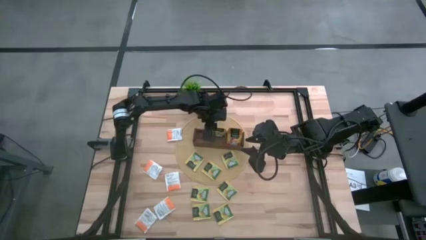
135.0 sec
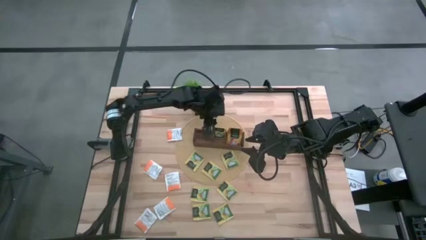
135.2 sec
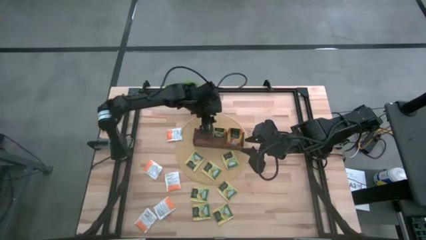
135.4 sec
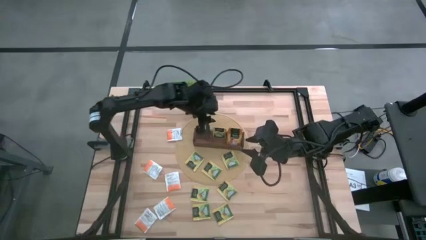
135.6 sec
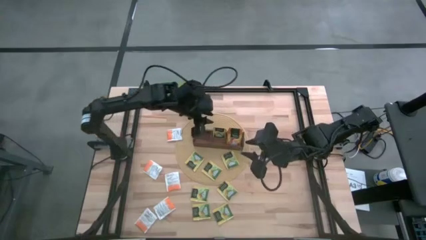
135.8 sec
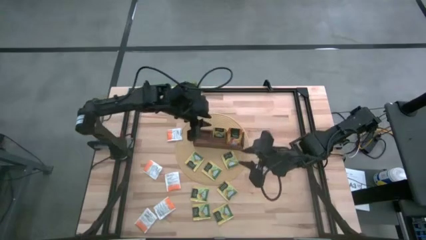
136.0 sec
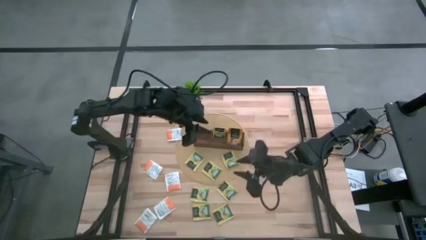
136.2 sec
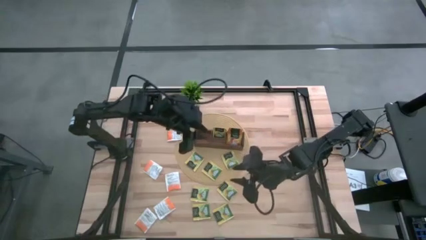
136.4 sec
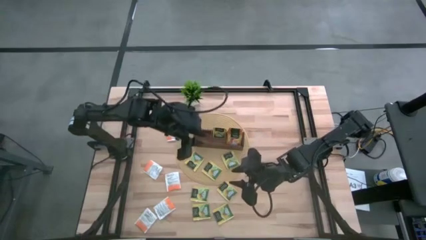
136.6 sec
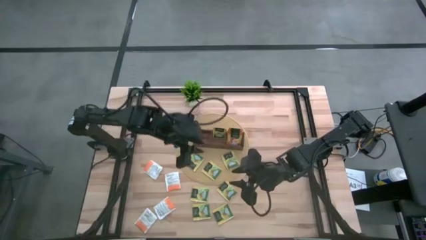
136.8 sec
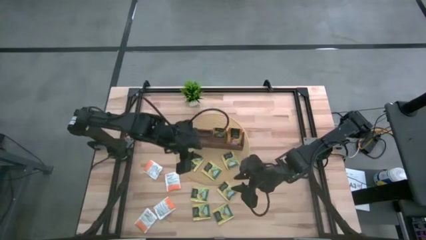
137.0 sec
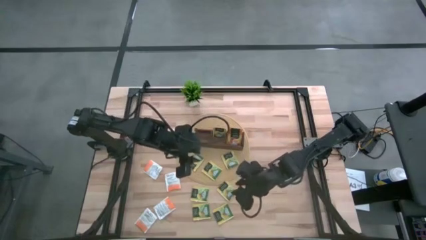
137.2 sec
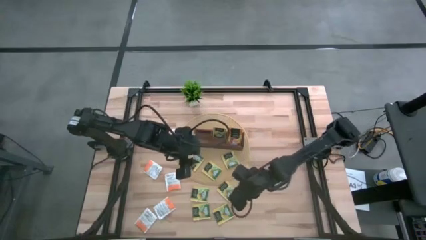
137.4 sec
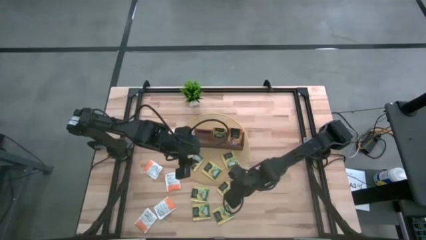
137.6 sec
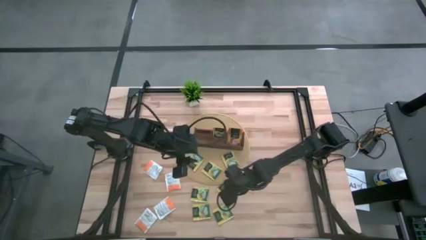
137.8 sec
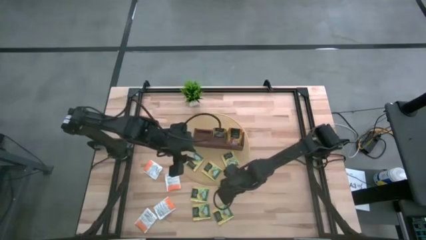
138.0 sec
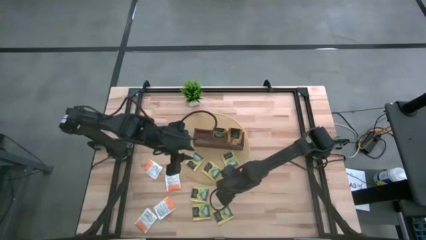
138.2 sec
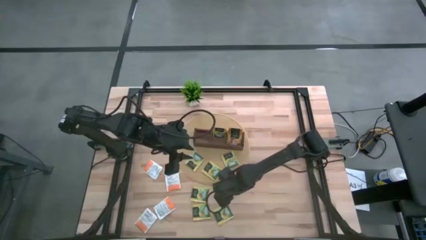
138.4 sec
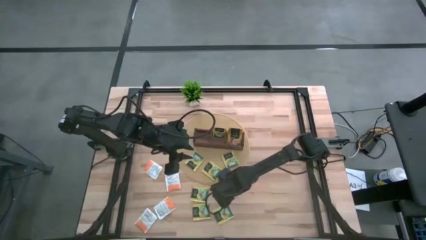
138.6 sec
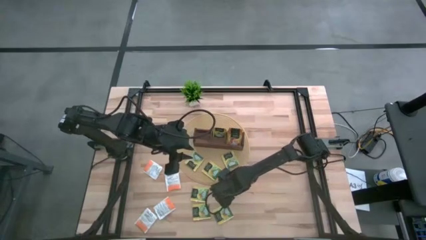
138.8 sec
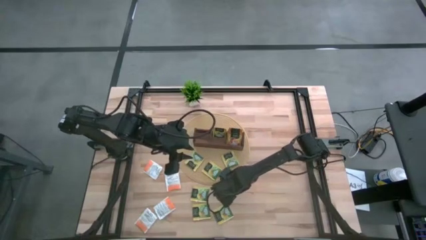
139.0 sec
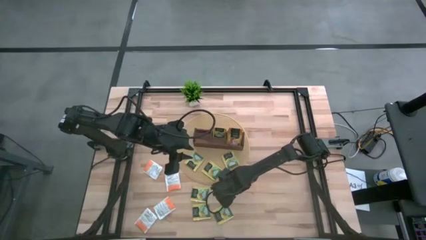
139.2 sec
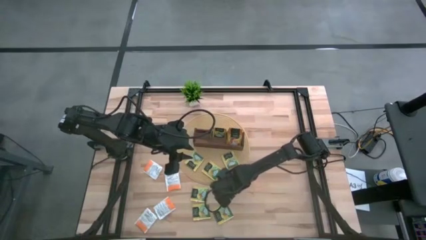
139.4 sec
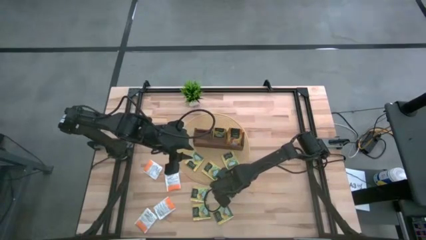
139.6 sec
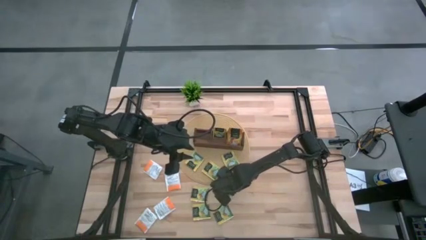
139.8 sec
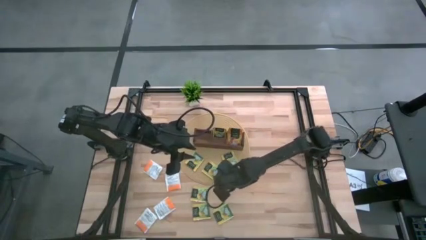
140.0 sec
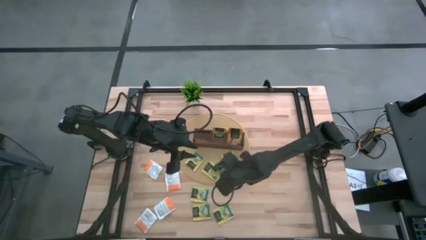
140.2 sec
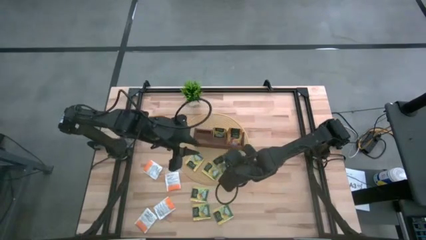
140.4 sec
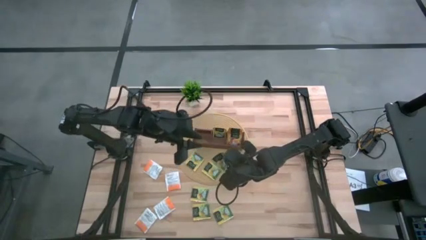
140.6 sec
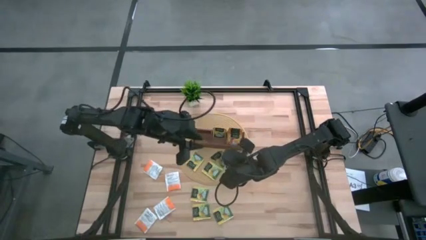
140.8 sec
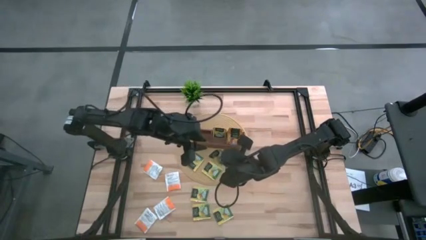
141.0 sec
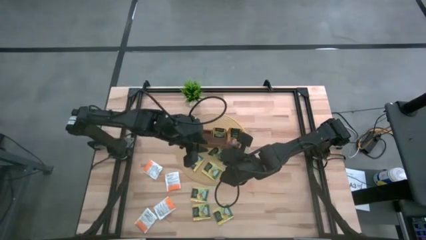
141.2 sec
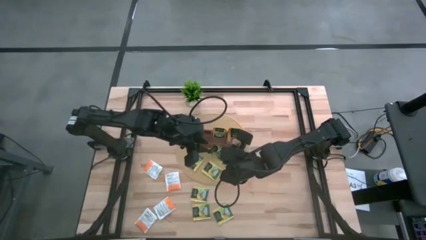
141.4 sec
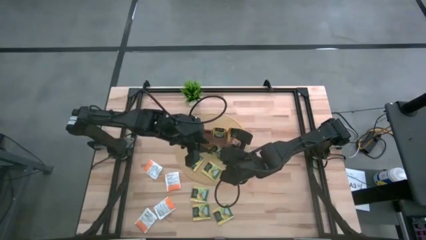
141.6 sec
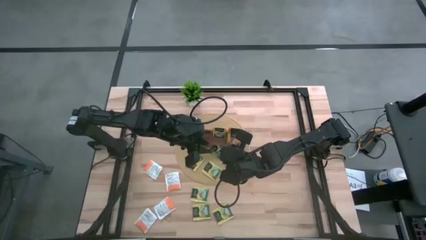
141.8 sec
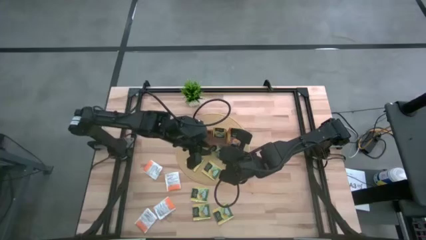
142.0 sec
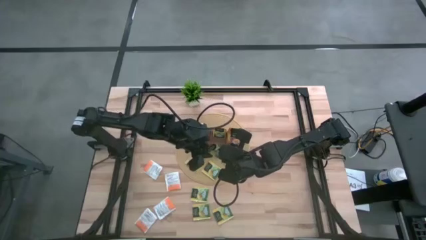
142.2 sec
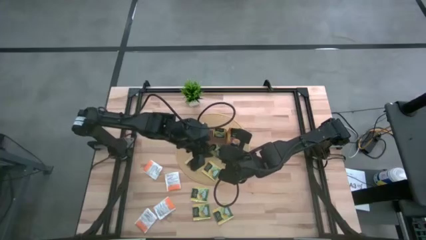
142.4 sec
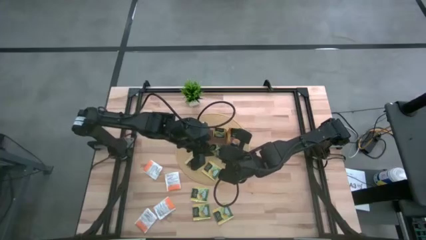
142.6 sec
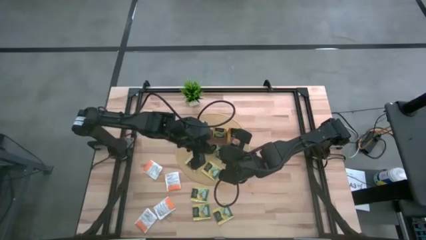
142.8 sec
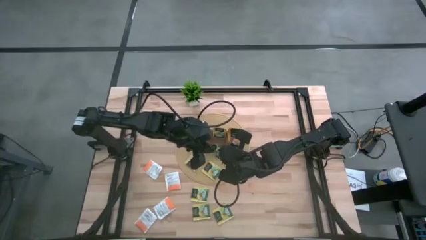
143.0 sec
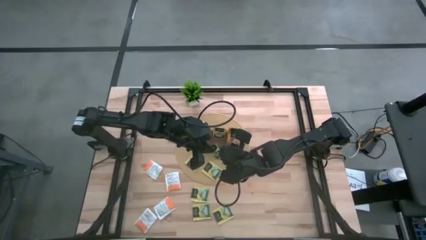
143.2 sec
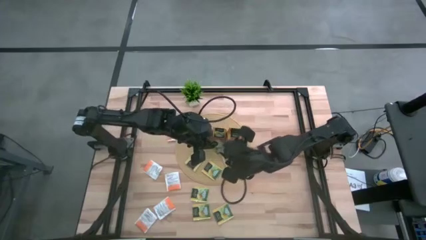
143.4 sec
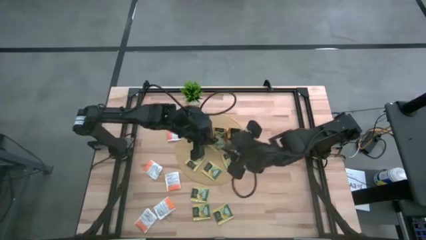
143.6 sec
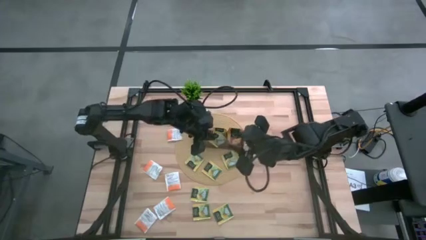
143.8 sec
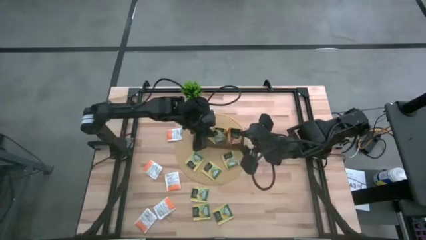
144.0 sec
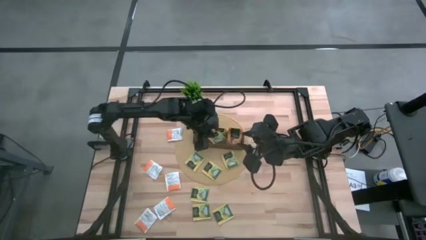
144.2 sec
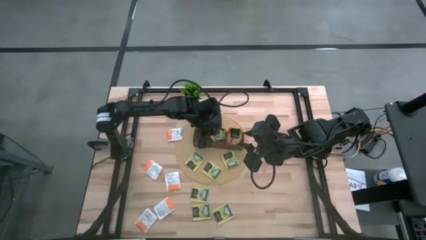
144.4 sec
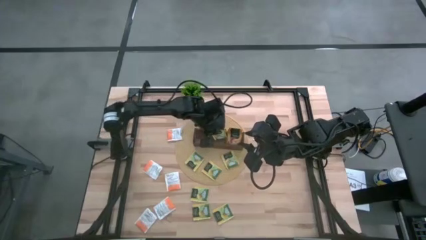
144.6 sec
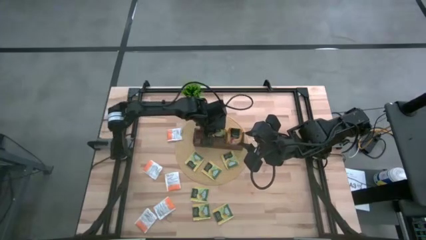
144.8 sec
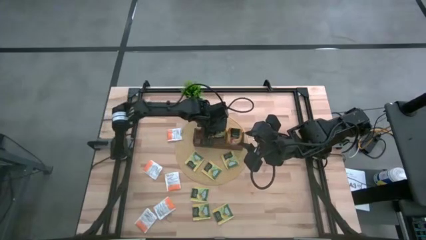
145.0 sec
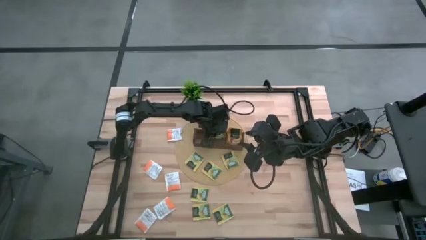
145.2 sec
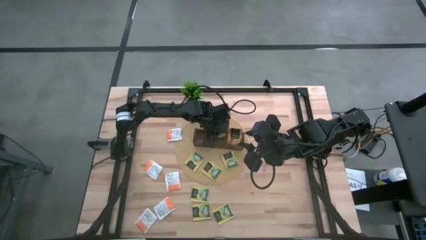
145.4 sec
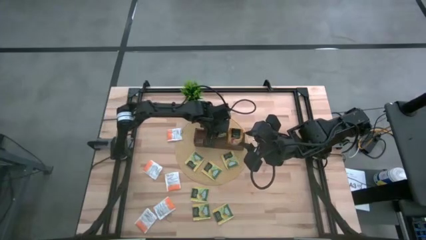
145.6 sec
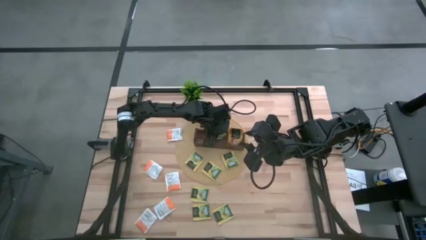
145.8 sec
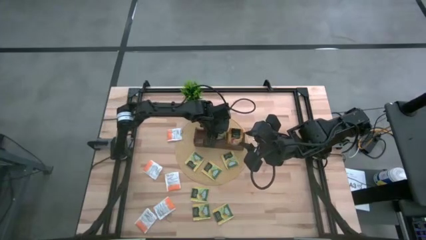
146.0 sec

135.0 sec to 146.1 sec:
Task: Pick & Place Tea
Put the yellow tea bag into the middle section of the wooden organizer

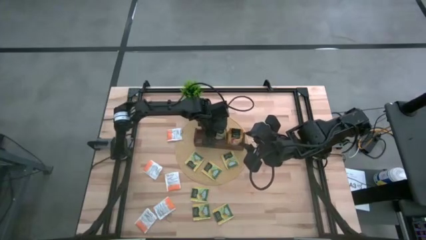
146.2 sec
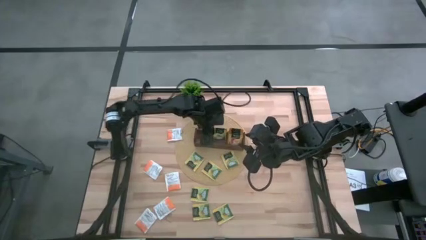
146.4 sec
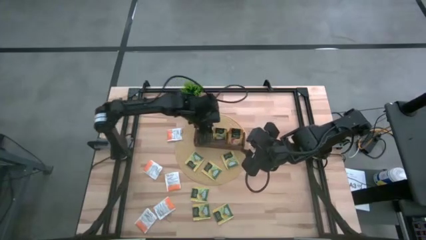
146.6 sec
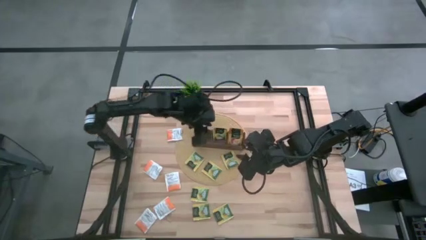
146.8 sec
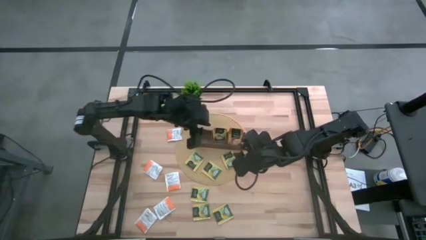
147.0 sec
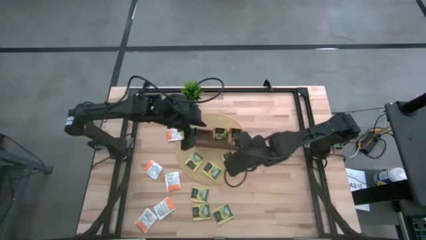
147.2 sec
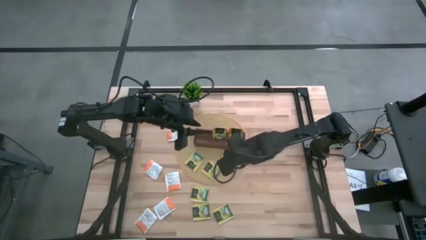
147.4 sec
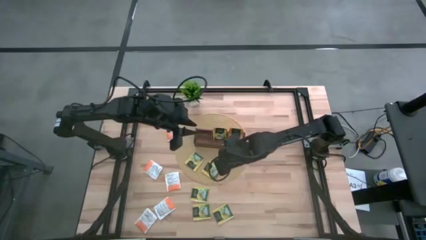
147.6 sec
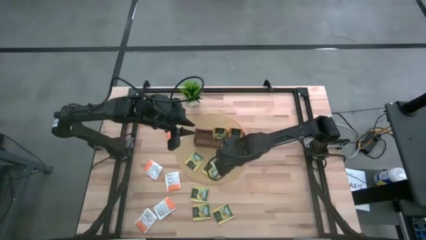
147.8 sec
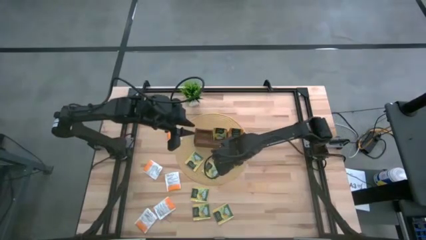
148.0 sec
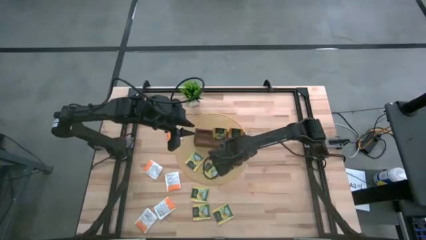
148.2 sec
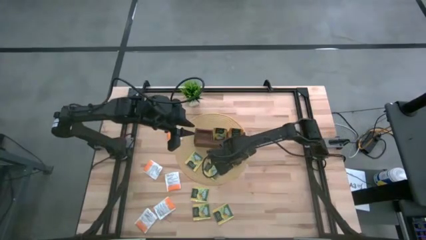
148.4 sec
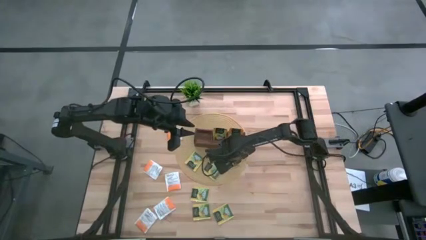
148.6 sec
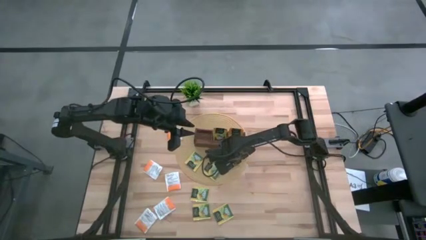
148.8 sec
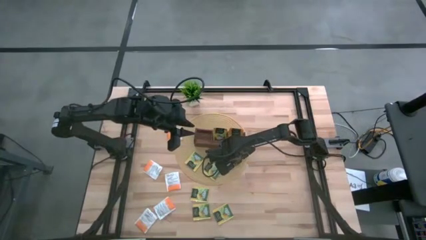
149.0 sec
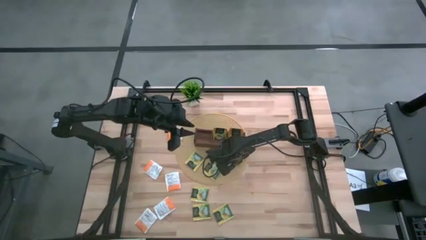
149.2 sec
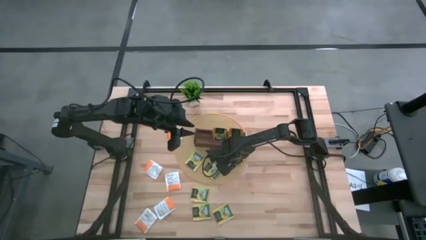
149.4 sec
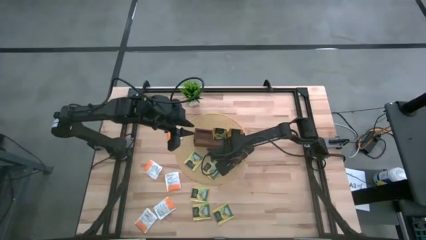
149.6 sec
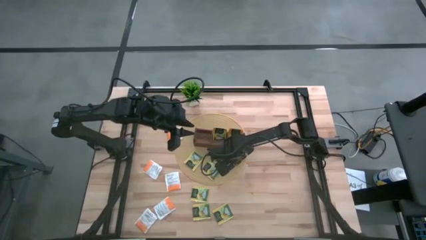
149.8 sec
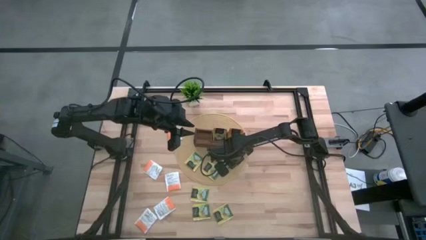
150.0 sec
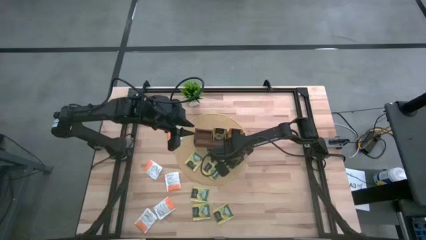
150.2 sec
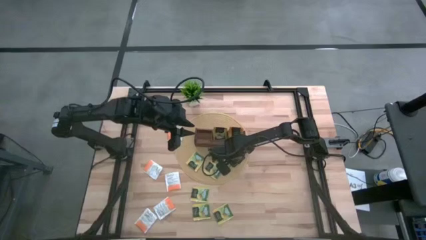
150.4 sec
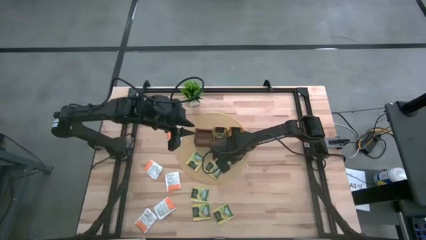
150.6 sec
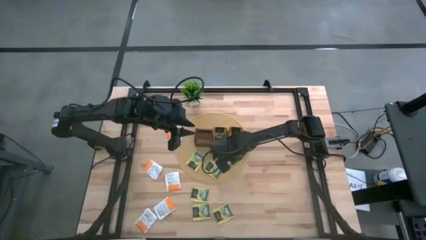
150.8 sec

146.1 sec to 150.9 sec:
Put the yellow tea bag into the middle section of the wooden organizer
